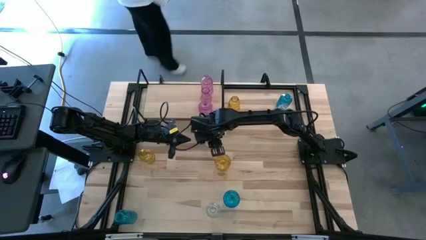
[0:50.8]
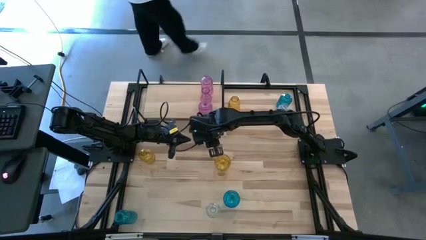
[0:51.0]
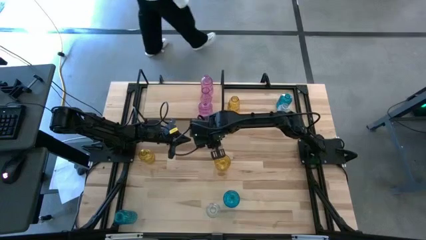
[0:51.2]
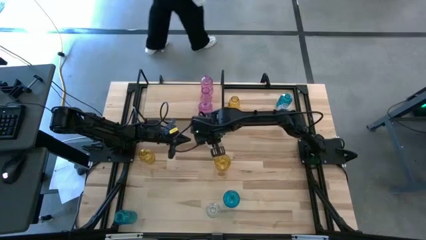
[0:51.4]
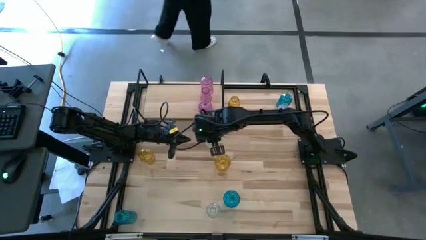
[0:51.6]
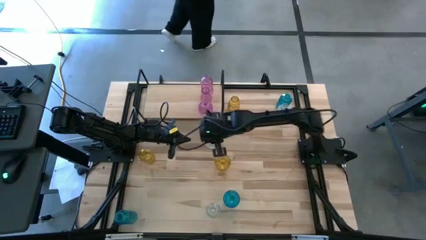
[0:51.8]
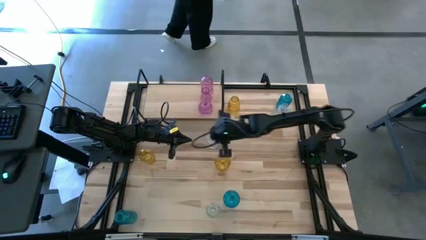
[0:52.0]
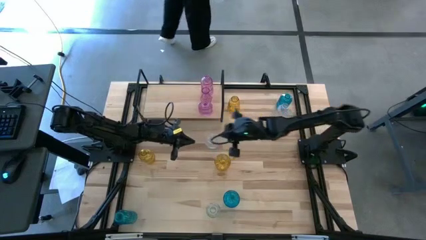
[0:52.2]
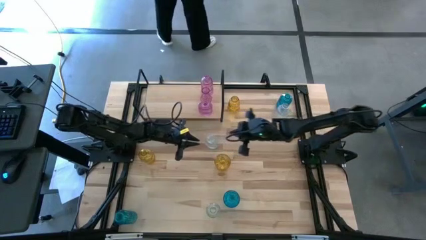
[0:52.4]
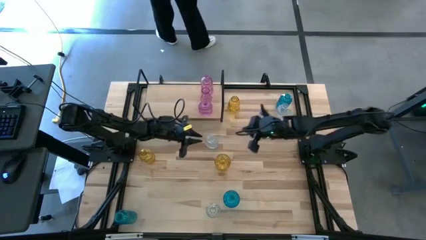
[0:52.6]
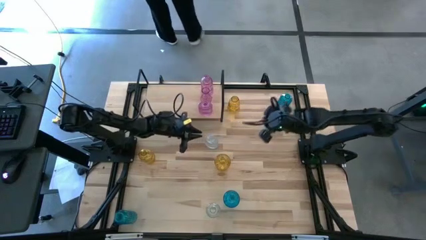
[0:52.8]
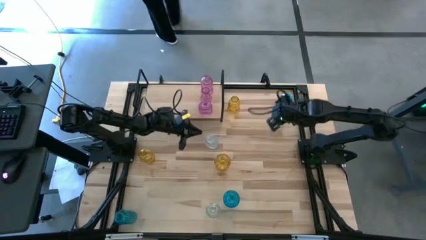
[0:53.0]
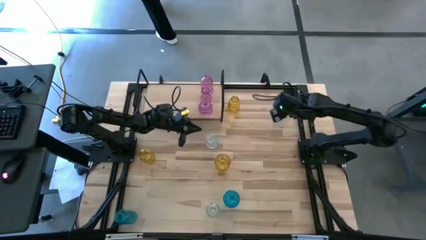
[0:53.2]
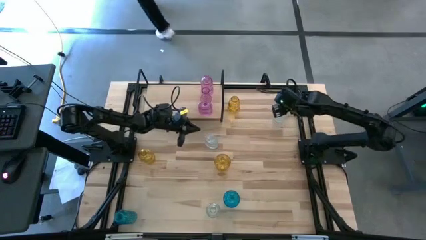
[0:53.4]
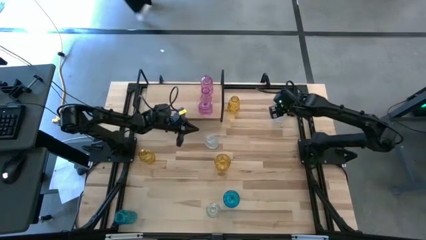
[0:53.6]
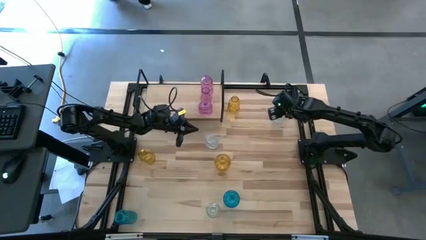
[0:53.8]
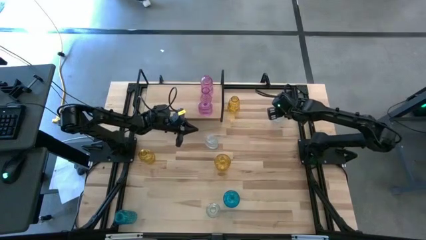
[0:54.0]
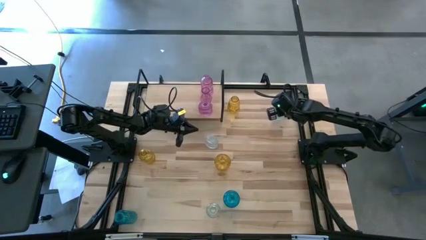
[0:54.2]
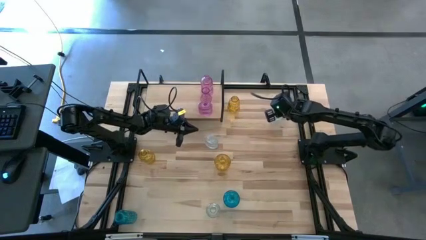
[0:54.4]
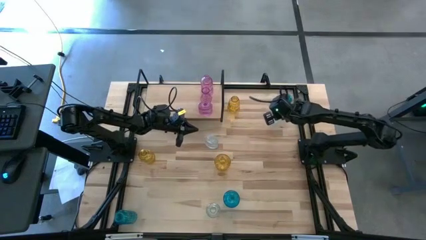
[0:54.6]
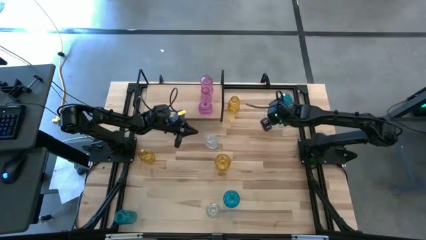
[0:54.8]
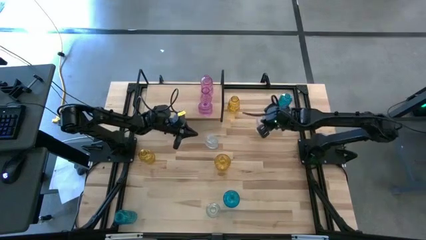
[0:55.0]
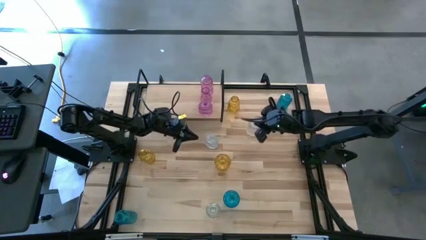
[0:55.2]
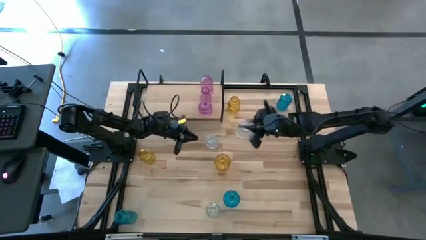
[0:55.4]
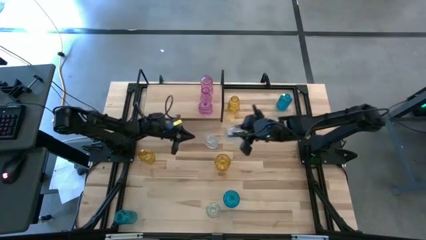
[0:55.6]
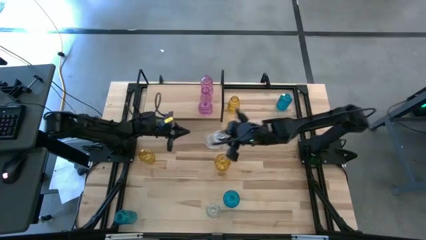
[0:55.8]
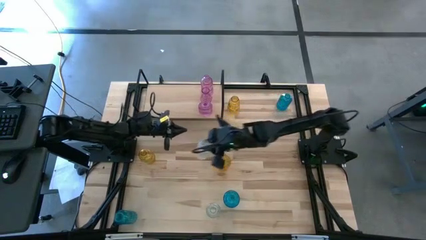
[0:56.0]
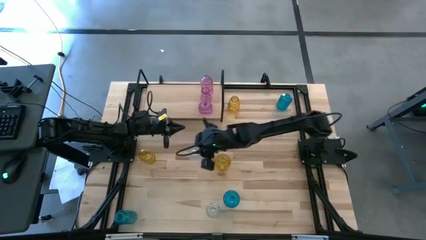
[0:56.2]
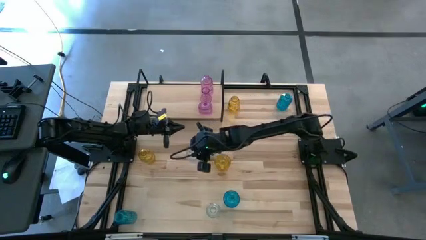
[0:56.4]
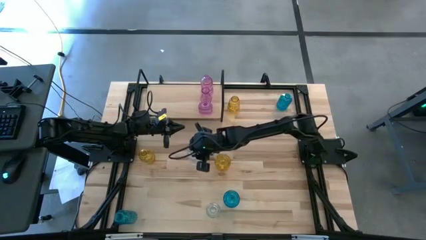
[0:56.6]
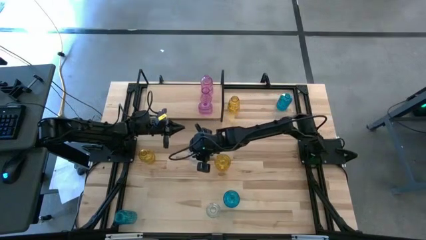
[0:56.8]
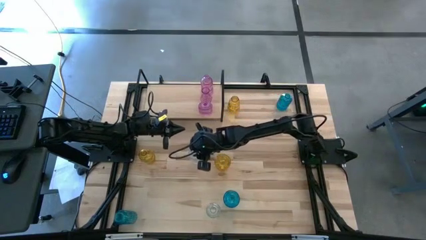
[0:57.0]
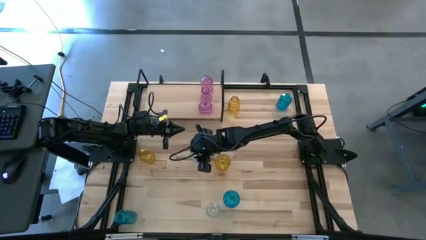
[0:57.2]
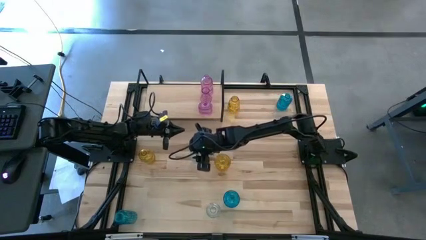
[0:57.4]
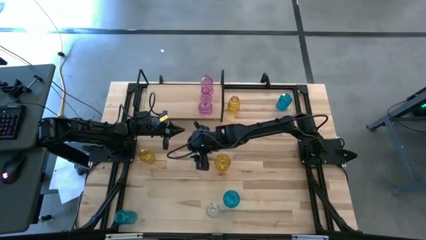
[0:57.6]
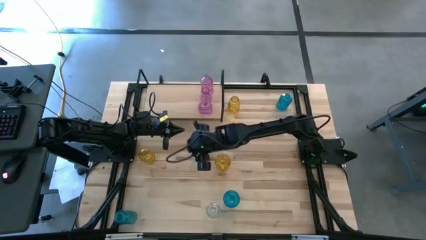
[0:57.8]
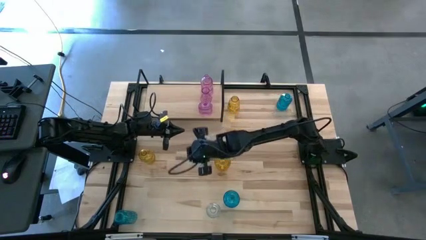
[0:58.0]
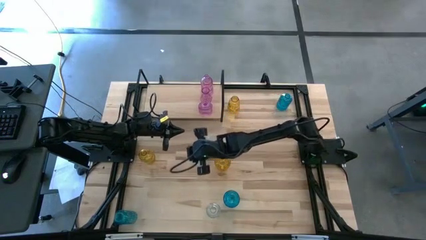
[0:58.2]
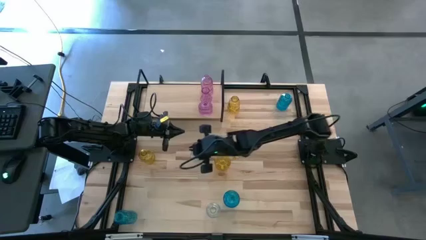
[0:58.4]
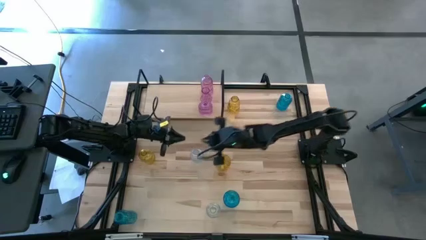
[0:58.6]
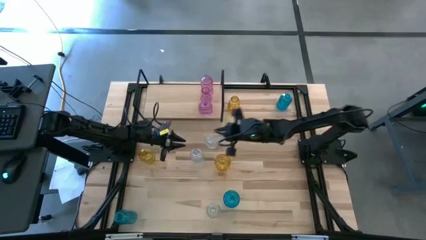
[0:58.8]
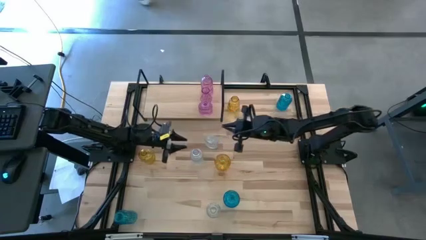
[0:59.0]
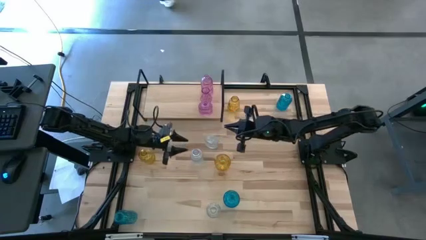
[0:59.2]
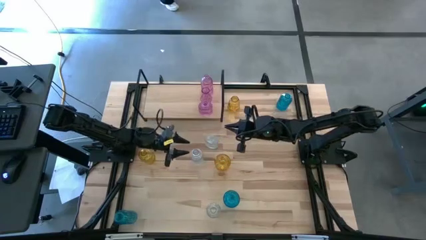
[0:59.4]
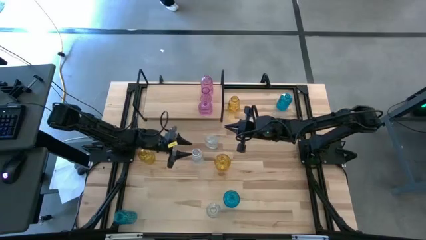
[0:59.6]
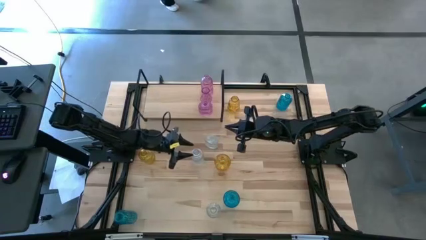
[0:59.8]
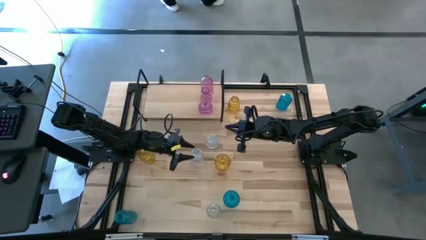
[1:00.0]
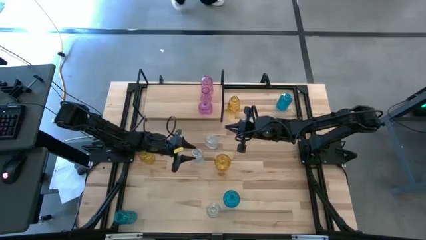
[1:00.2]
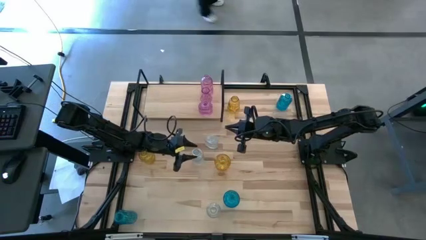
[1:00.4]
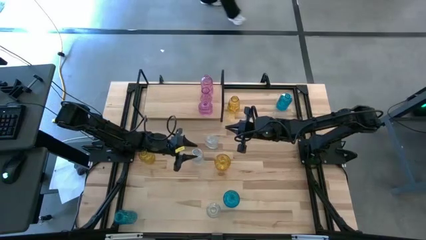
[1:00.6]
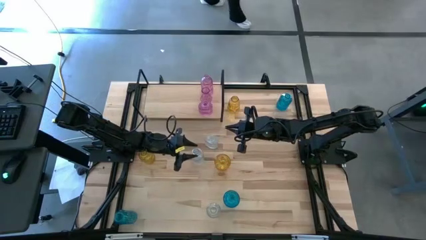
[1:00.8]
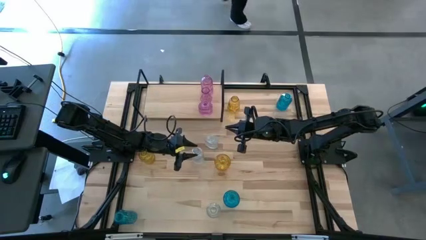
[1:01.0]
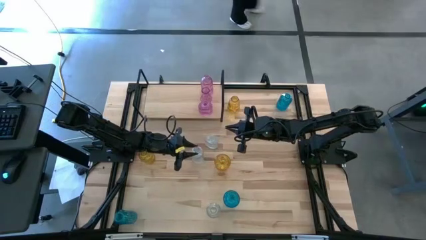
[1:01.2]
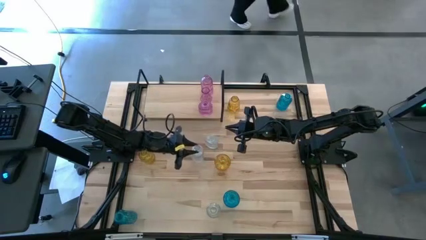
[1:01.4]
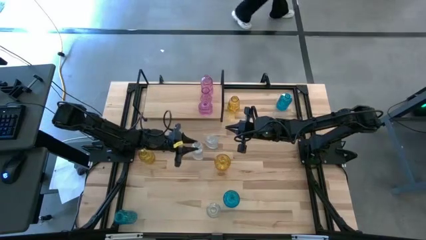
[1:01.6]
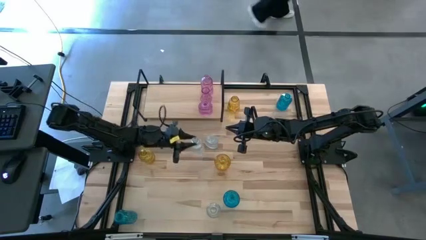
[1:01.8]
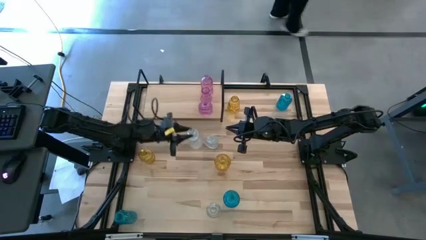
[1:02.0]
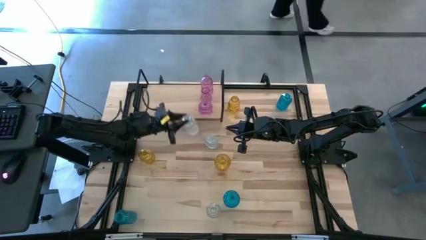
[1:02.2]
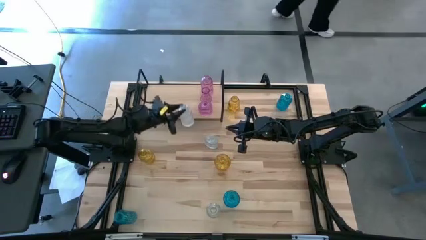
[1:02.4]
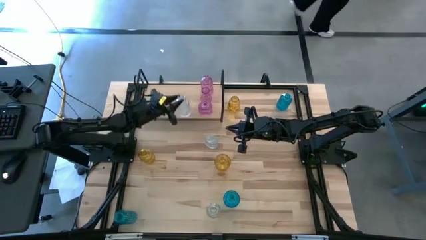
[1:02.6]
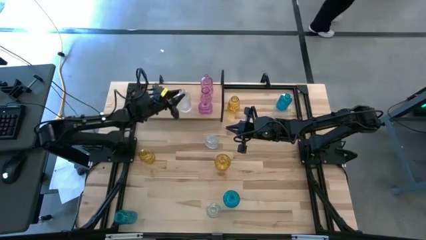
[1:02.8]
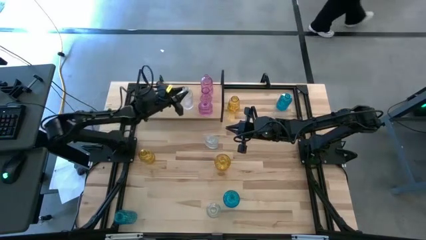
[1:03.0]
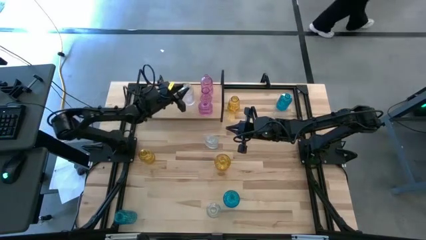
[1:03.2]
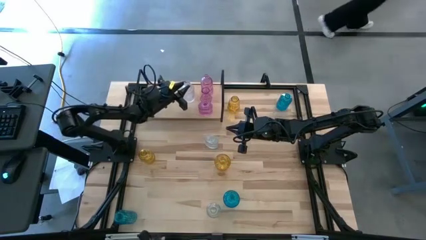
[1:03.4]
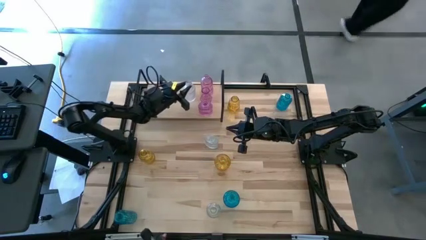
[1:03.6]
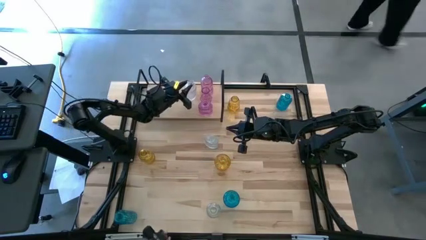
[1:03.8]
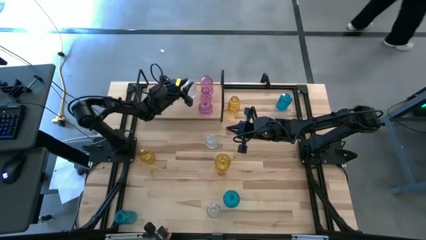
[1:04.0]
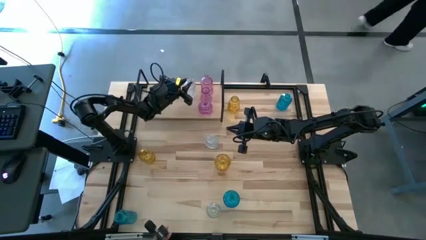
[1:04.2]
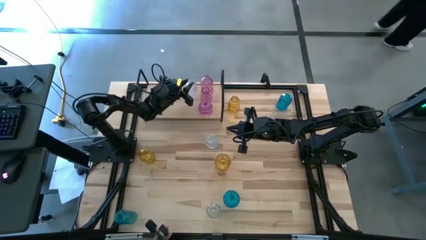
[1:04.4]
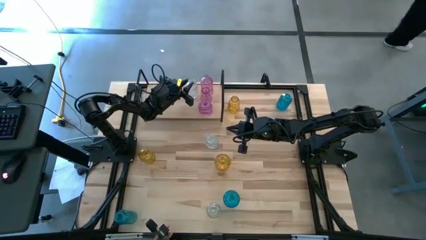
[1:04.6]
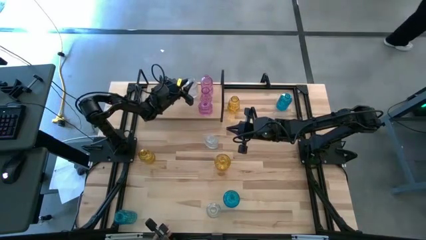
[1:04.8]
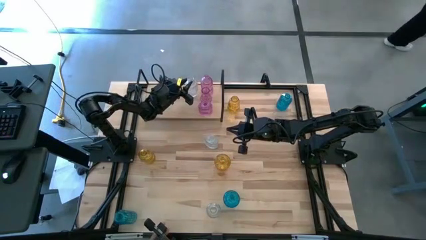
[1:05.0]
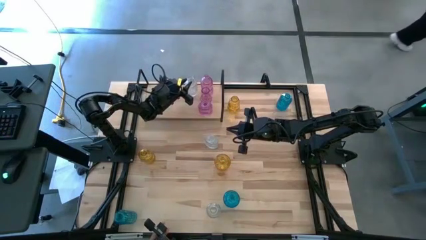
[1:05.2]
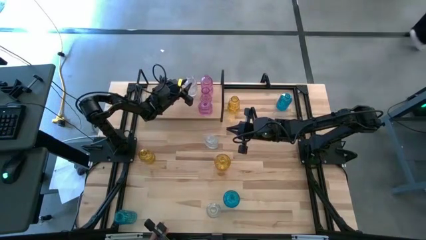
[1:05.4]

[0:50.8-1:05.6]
Task: sort vases onto shelf
Put the right transparent vase on the shelf

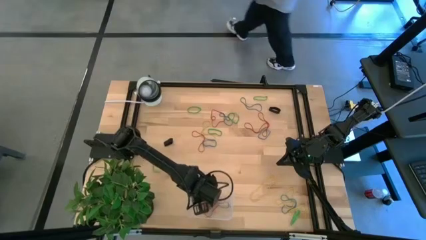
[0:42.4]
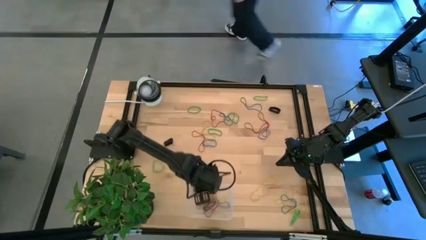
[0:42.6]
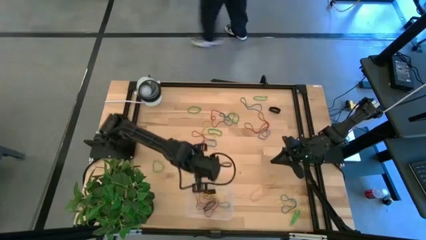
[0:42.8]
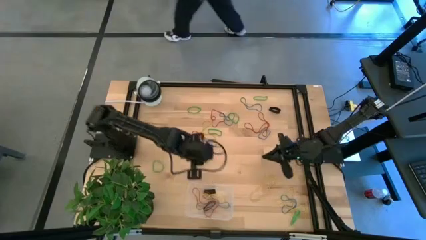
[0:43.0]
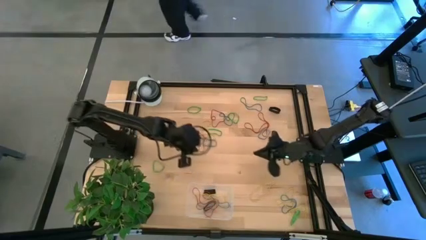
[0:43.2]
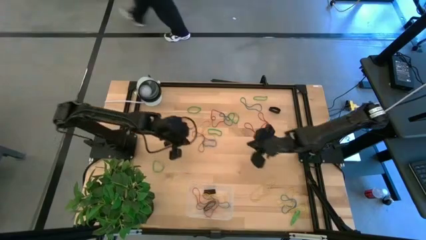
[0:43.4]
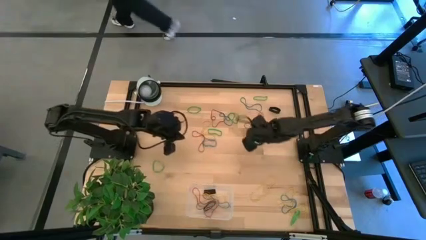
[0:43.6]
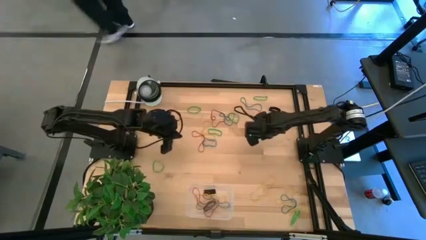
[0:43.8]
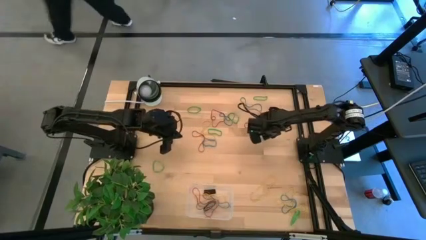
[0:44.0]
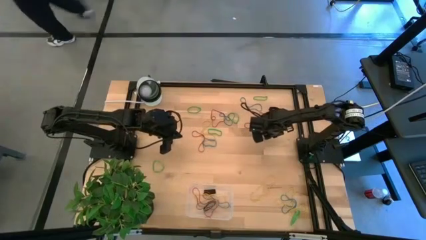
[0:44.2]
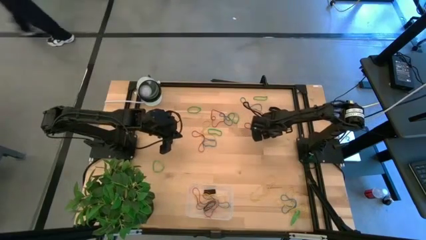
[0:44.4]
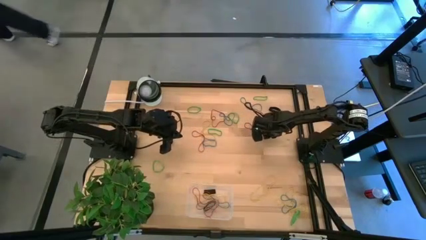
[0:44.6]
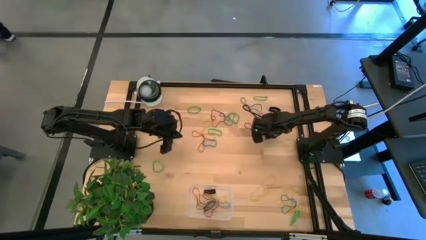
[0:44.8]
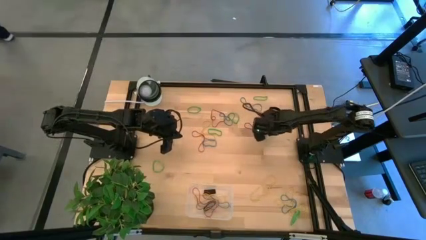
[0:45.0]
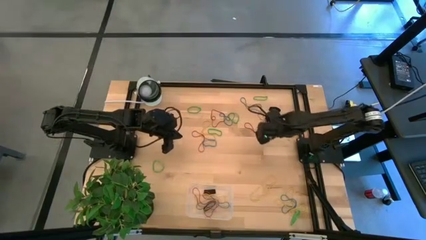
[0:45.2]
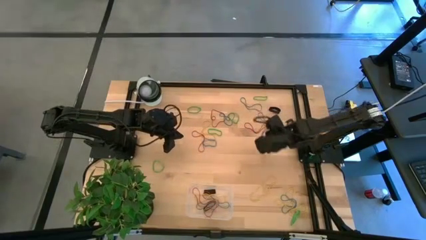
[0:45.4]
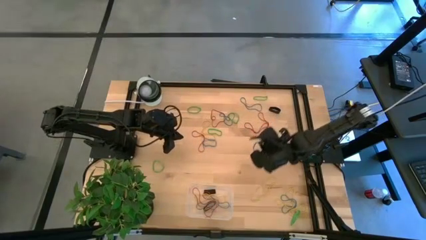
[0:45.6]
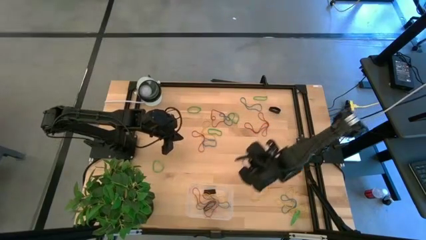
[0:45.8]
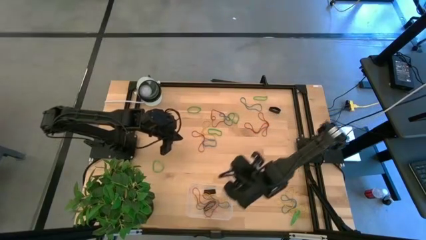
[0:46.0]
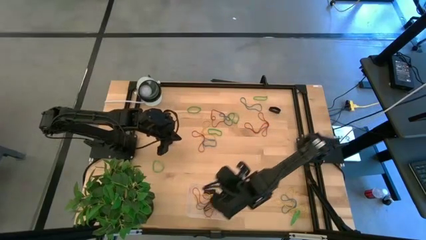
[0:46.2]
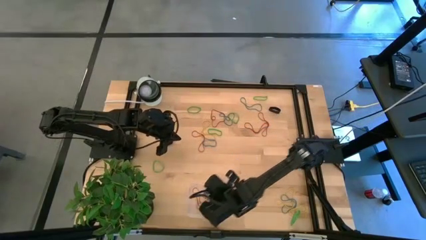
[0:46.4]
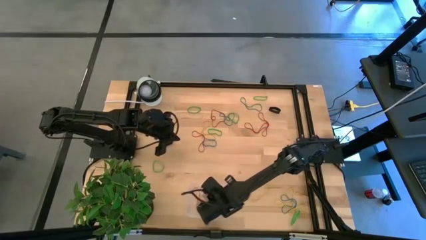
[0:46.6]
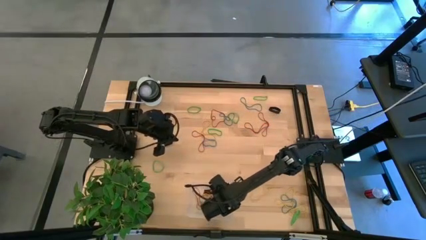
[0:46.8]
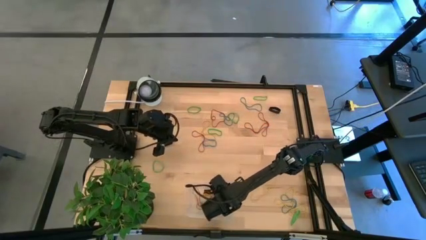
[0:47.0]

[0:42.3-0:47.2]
Task: Pick and place rubber bands into bin
Put the blue rubber band into the transparent bin
